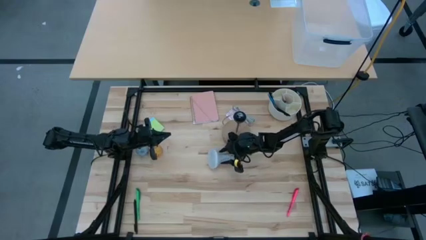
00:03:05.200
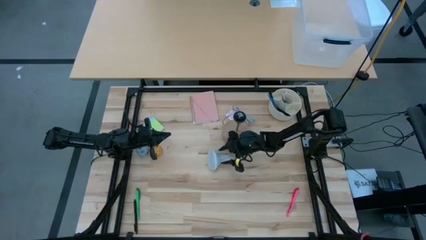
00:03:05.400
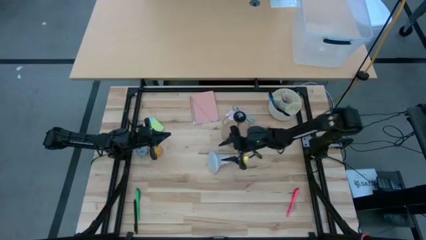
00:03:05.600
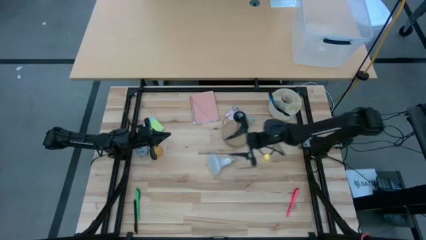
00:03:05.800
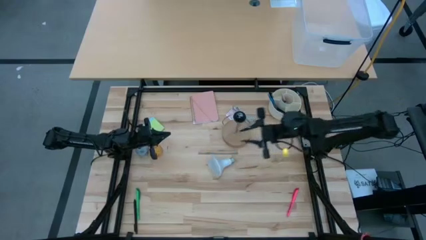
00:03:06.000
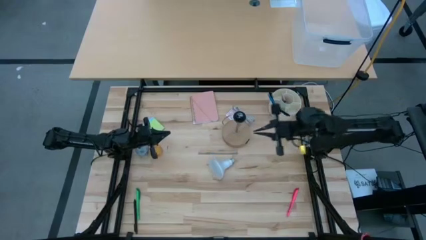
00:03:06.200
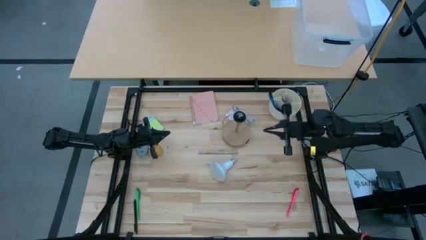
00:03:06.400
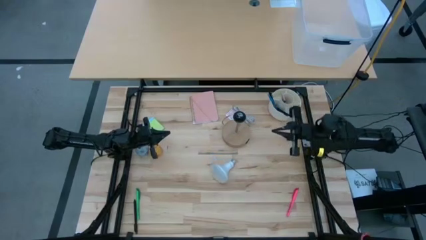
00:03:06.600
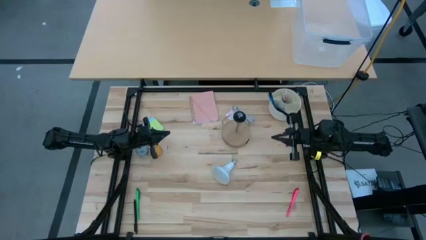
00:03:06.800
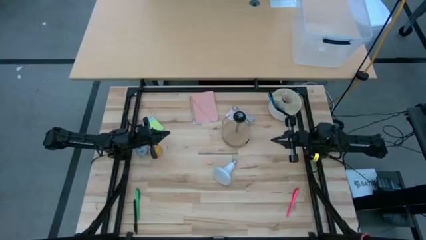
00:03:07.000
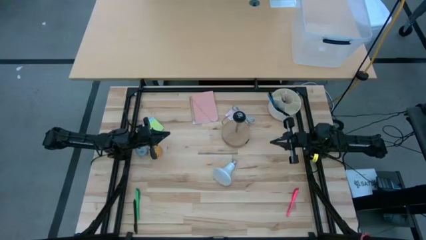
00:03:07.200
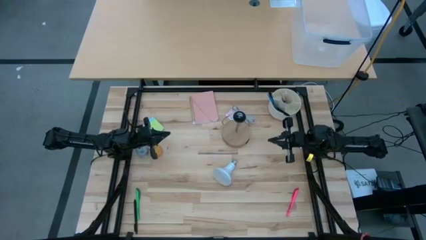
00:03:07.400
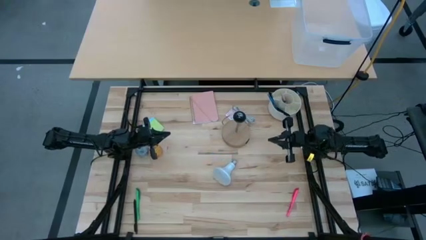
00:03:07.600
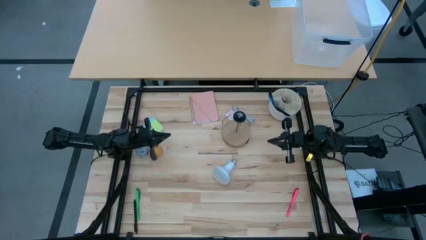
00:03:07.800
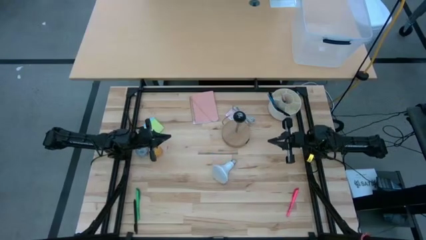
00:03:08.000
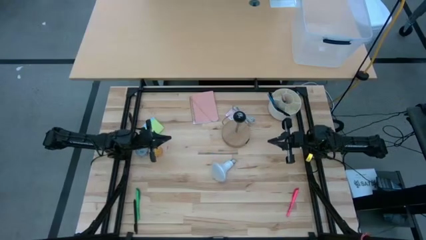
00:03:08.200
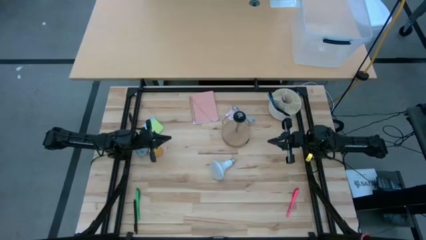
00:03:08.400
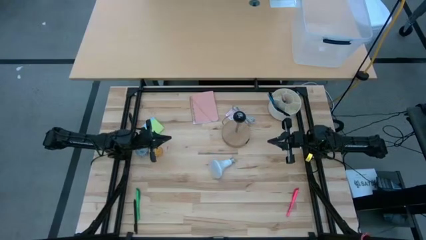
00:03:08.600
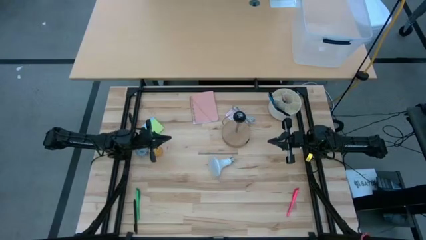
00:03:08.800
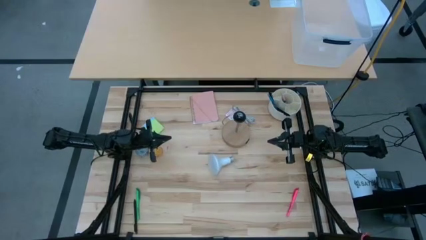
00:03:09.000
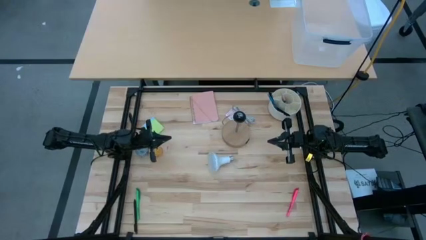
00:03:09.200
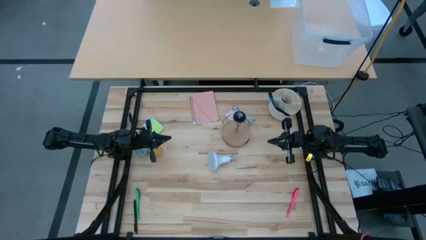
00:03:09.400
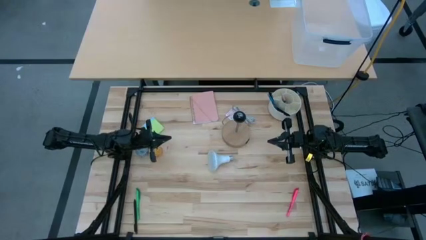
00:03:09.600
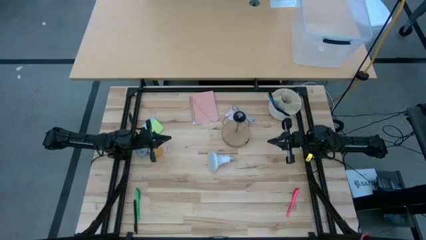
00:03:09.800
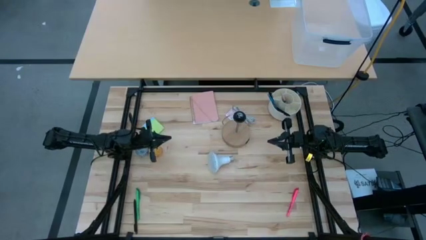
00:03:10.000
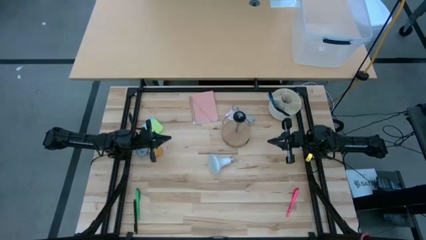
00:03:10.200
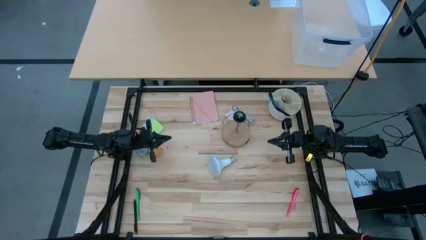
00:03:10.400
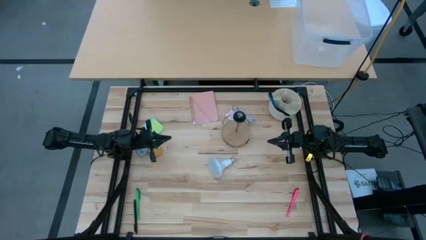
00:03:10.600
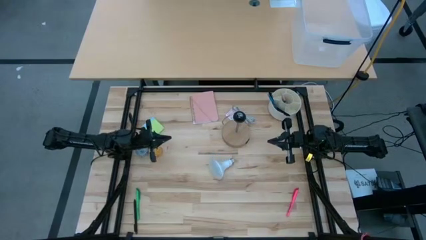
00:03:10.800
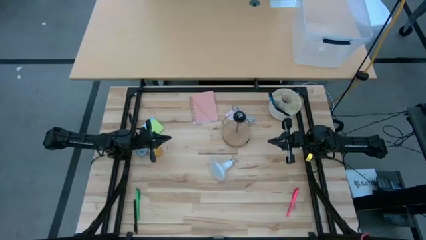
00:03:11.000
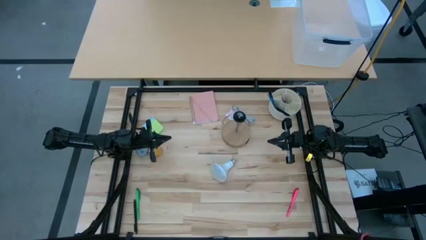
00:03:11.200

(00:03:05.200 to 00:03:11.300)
Task: Screw lightbulb
Return to Home Position

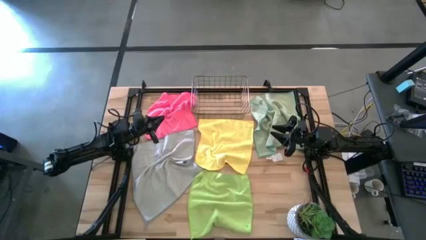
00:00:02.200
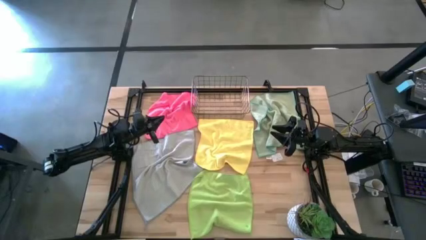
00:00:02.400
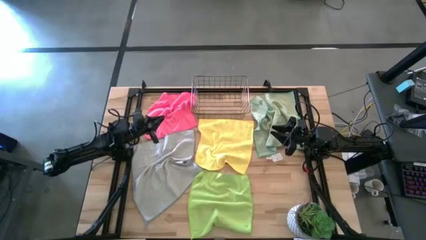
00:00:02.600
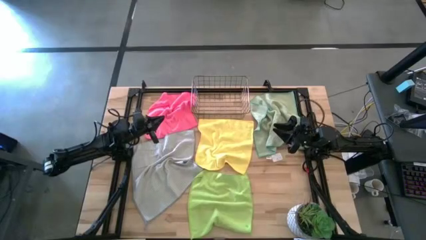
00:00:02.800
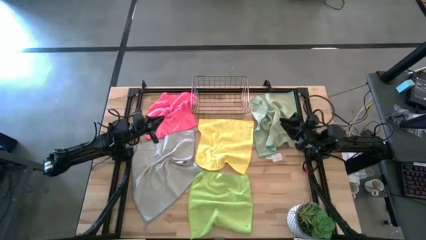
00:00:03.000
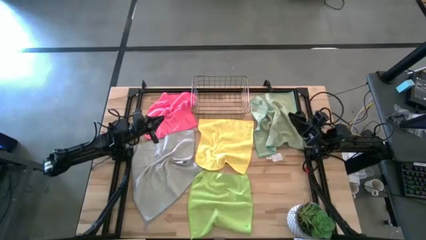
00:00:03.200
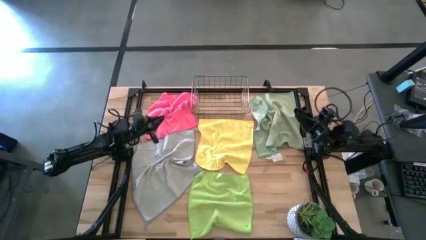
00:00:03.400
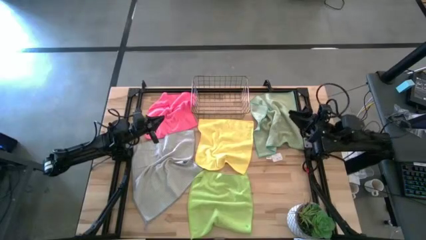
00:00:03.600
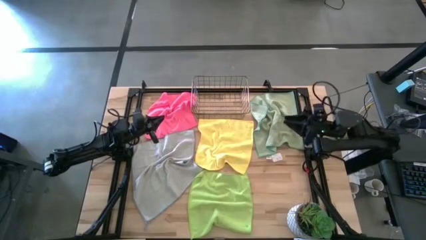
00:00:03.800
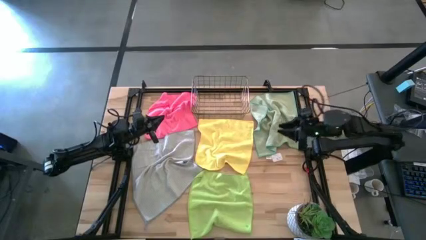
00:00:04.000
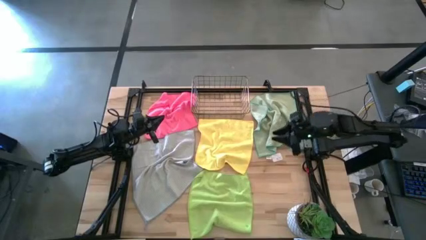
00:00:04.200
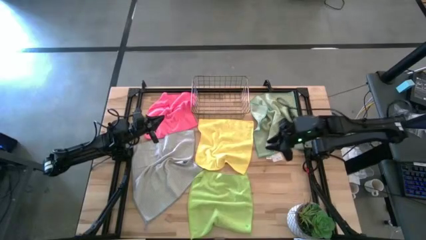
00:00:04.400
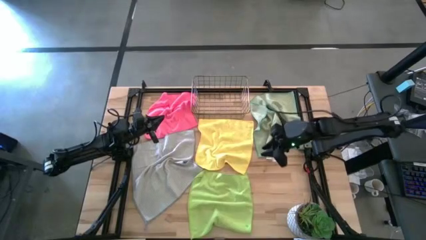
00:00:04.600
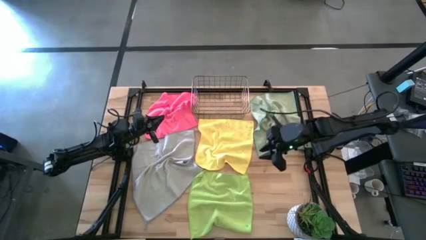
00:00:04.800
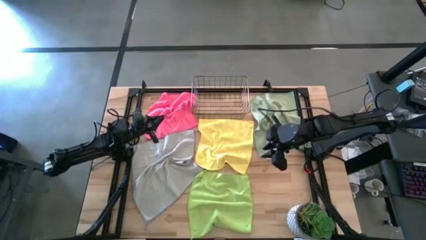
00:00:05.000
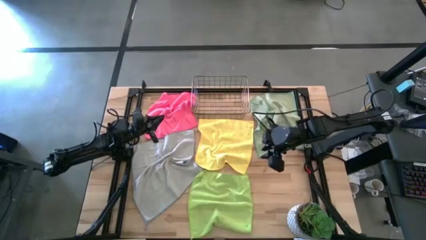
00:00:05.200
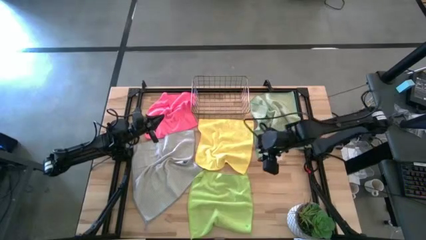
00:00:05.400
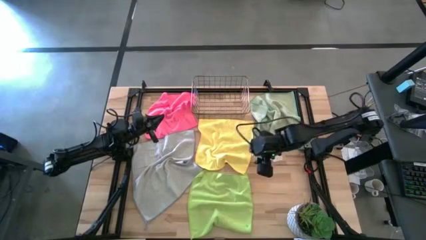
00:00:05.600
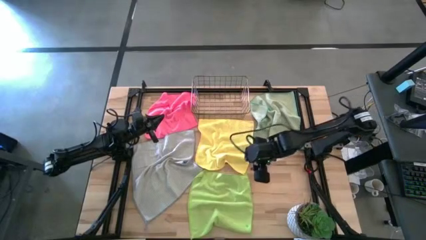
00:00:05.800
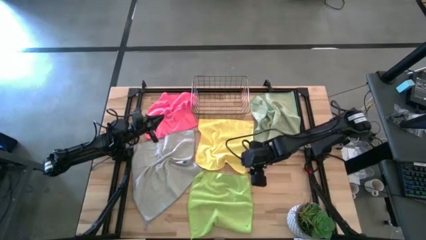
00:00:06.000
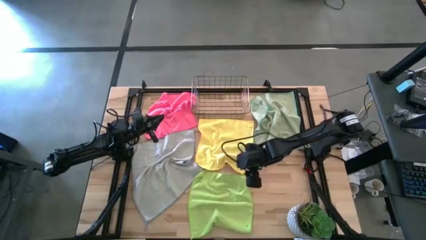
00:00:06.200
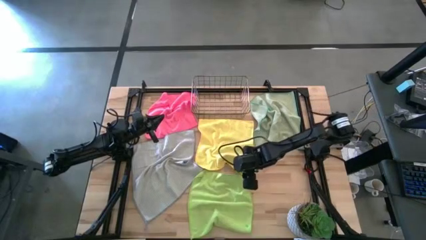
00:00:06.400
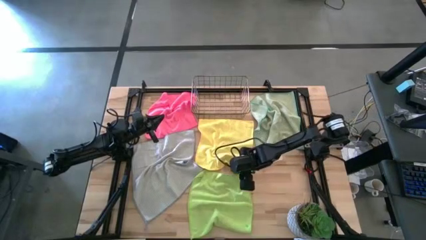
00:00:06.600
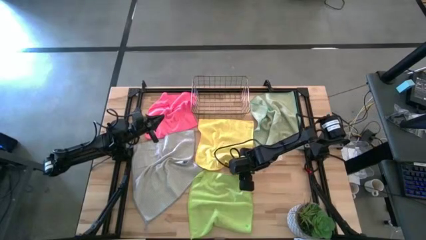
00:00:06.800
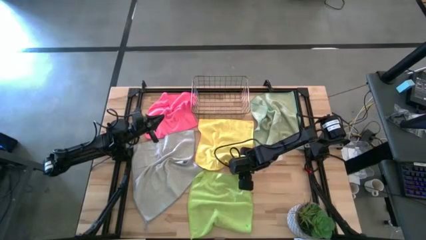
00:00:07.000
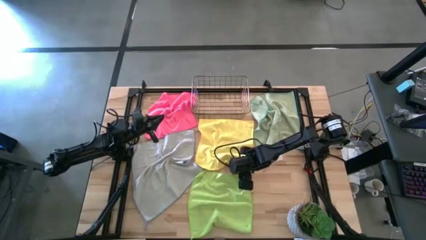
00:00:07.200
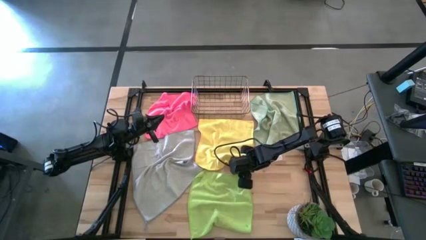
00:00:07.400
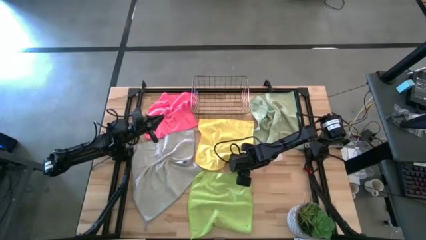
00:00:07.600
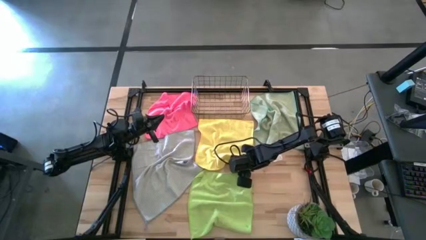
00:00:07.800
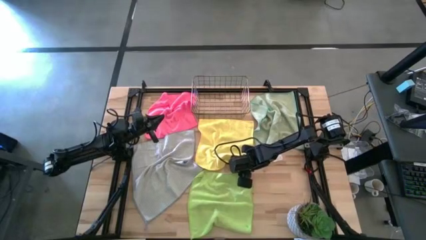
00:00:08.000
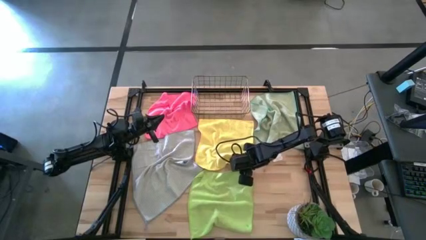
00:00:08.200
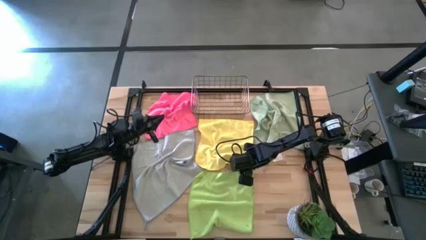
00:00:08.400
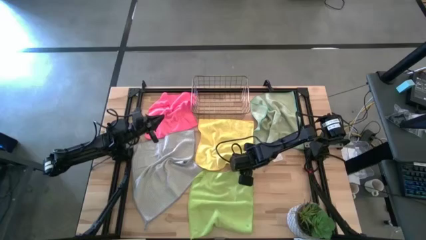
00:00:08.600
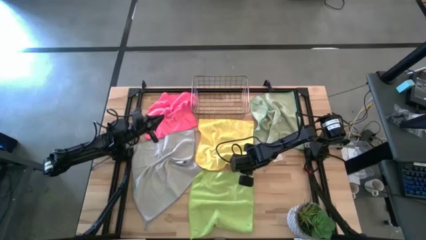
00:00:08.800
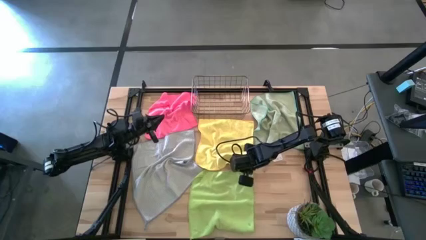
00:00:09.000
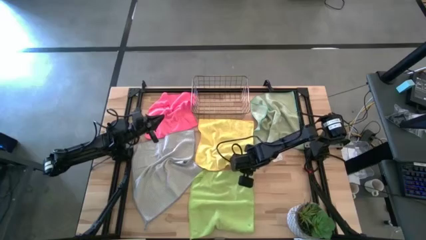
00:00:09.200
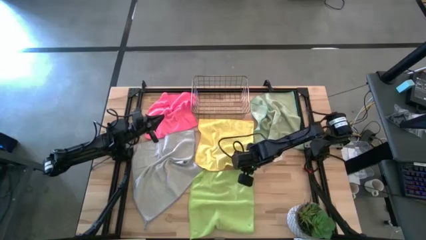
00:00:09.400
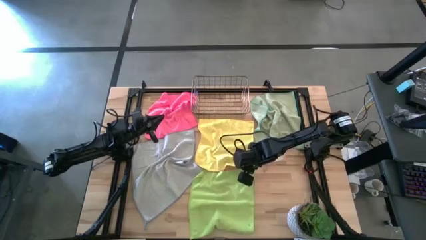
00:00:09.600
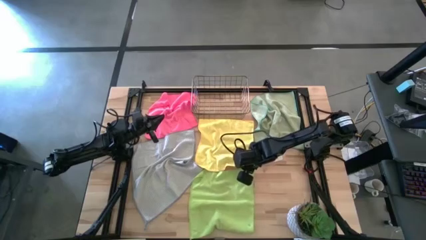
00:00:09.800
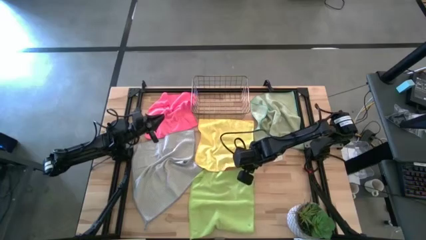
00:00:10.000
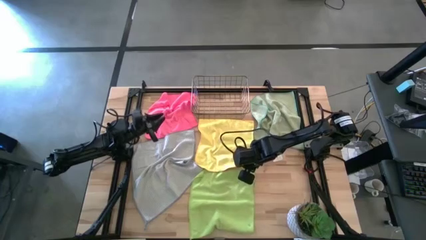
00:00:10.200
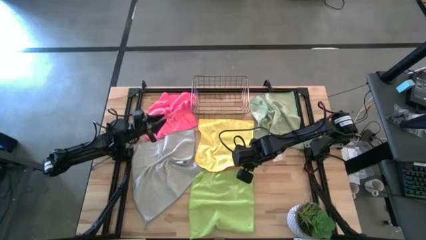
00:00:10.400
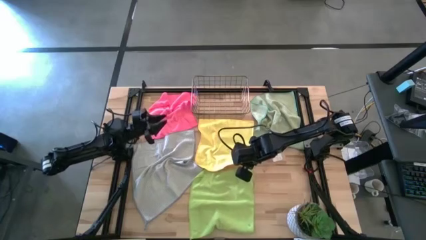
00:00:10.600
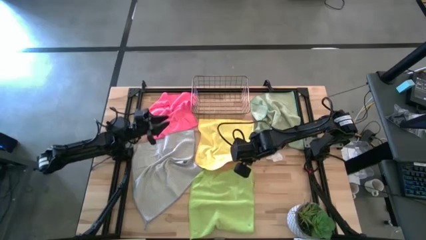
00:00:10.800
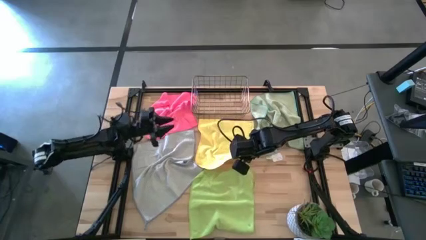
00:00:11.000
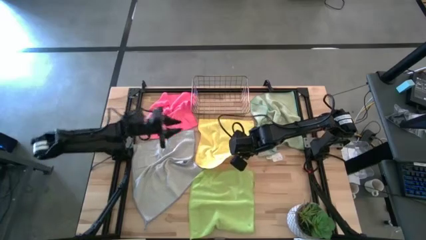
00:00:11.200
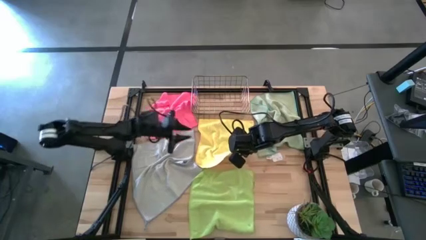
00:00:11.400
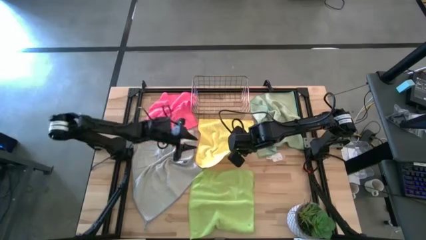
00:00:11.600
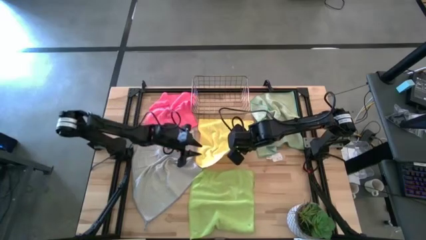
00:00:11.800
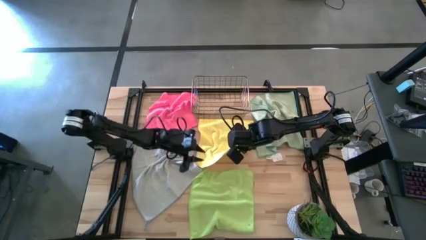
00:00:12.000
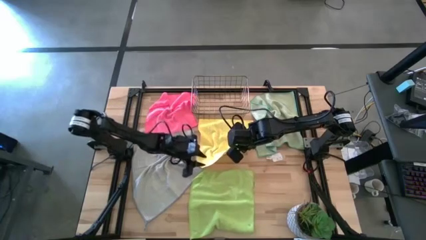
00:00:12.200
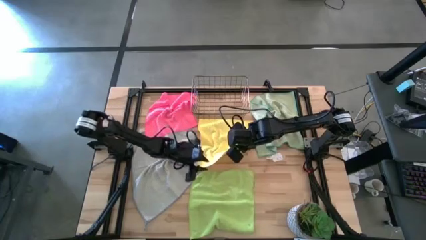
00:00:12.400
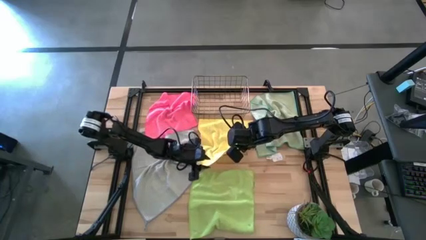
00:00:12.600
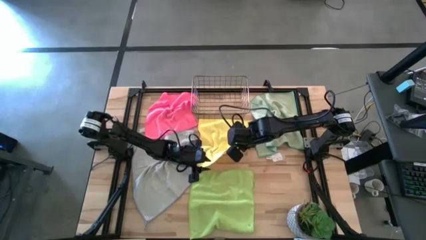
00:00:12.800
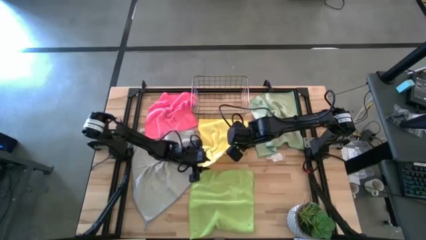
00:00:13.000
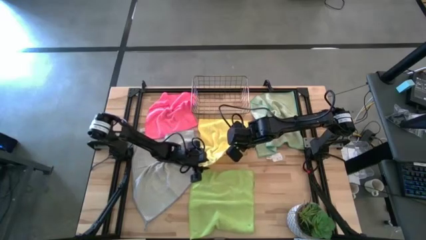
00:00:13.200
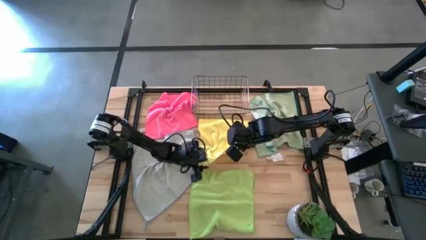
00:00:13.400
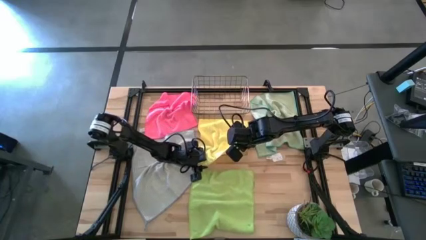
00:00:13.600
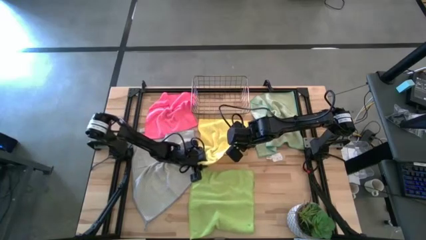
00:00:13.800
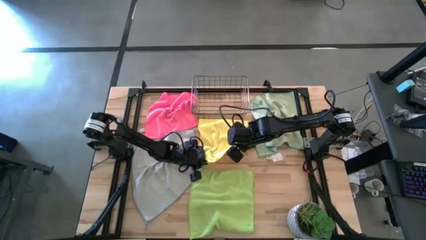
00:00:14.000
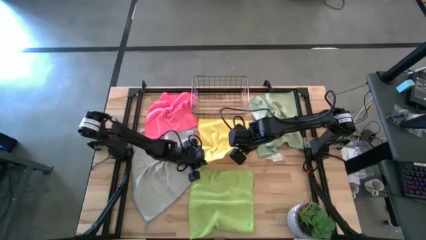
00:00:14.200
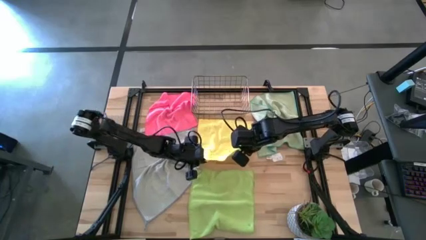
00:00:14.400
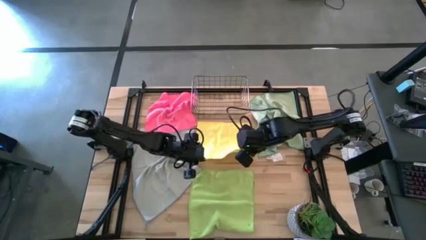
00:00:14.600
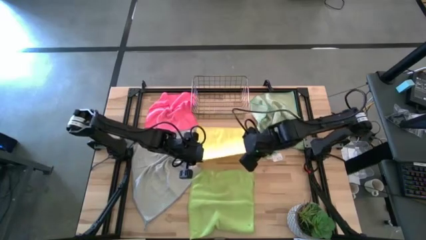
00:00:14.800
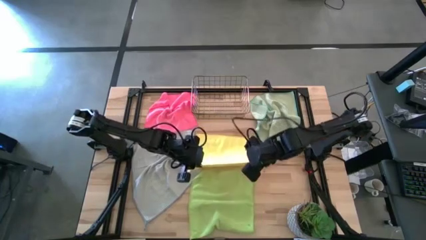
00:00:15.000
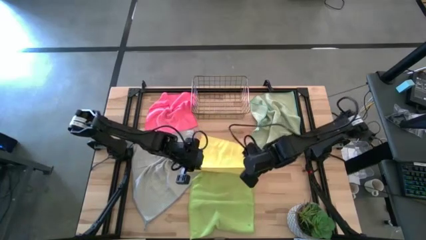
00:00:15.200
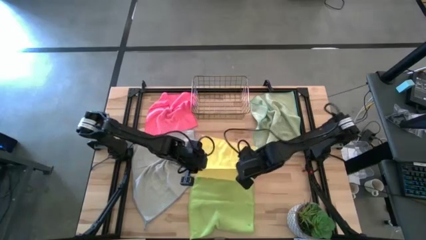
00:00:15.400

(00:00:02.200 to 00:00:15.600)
Task: Fold microfiber towels
Fold the yellow towel
